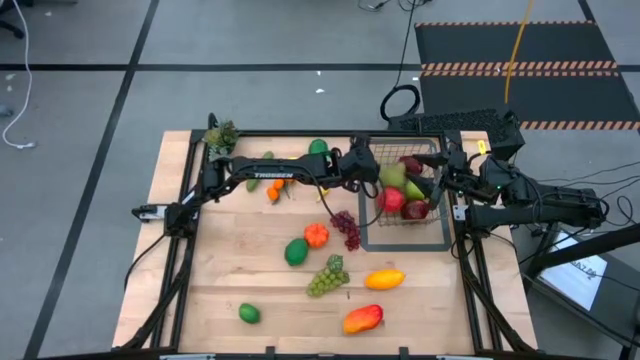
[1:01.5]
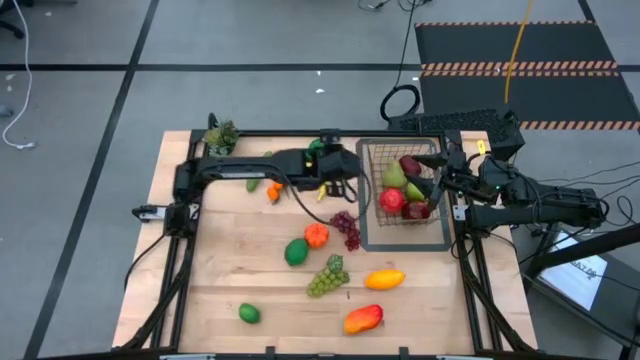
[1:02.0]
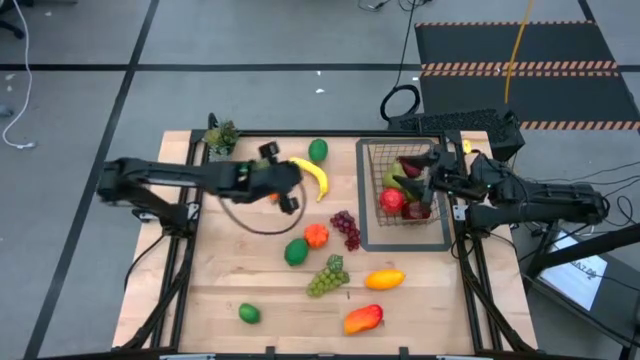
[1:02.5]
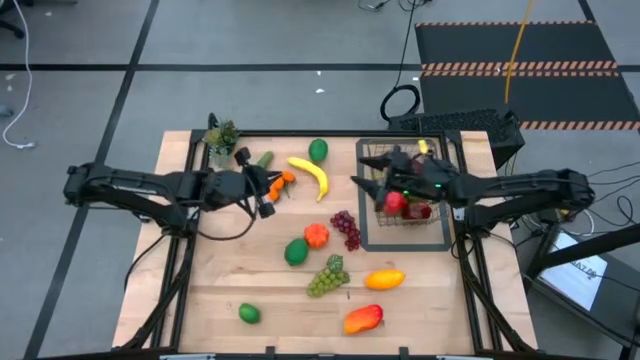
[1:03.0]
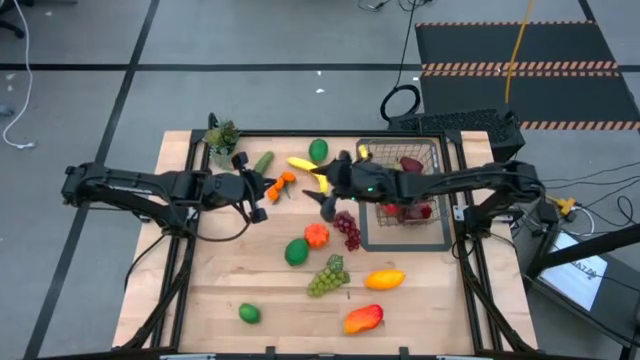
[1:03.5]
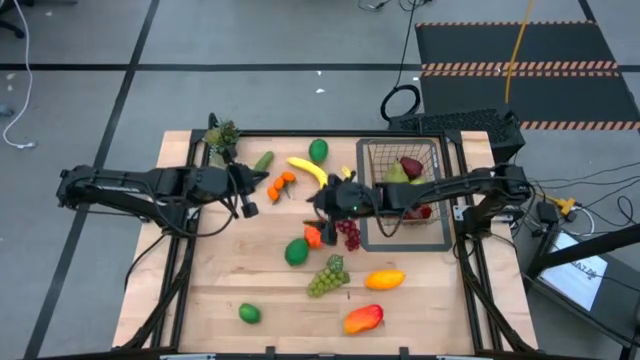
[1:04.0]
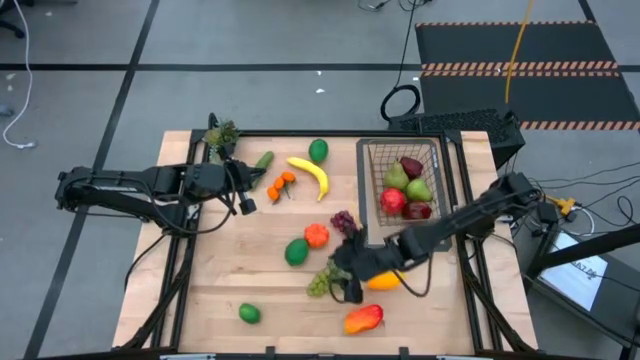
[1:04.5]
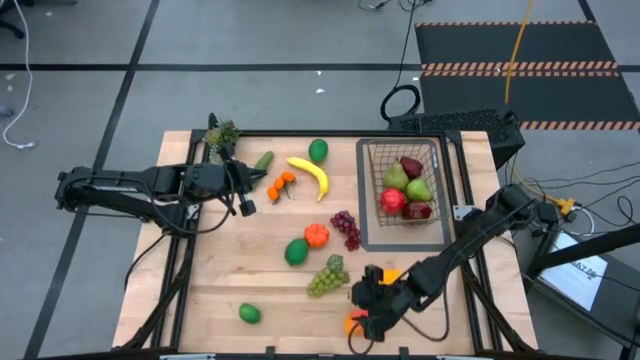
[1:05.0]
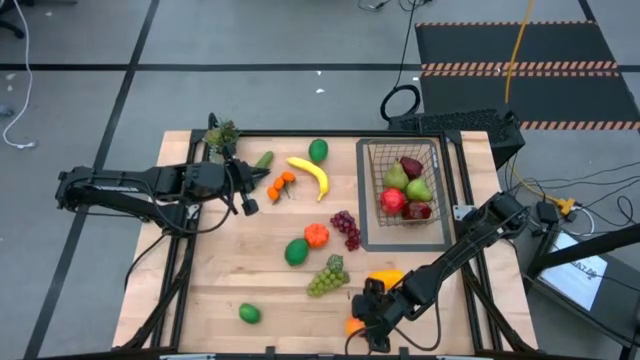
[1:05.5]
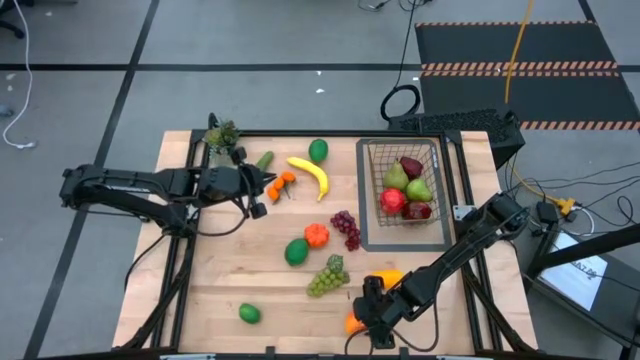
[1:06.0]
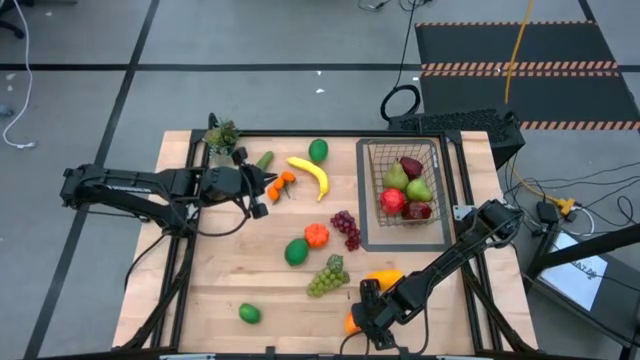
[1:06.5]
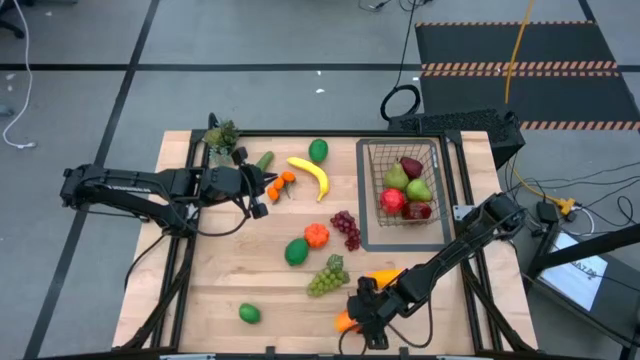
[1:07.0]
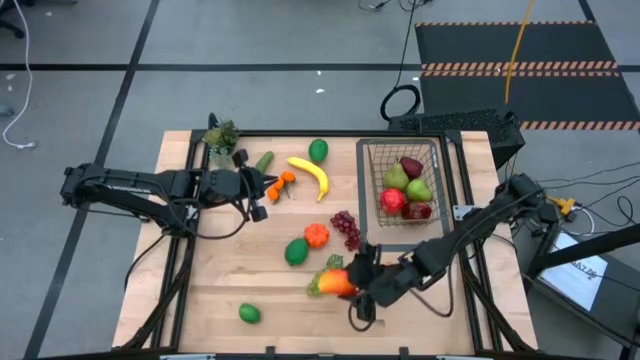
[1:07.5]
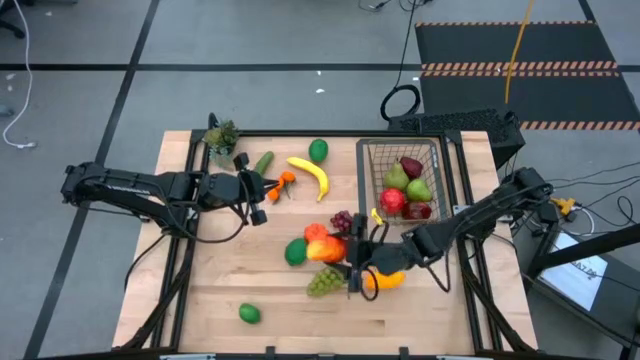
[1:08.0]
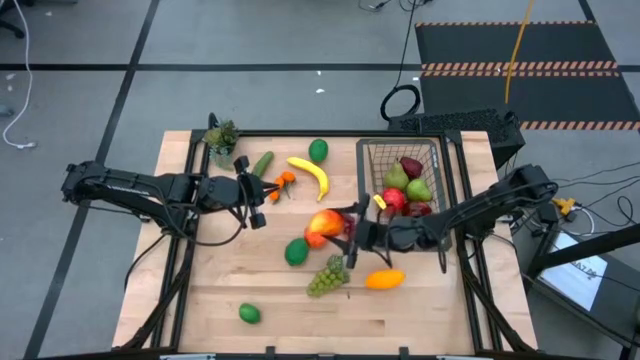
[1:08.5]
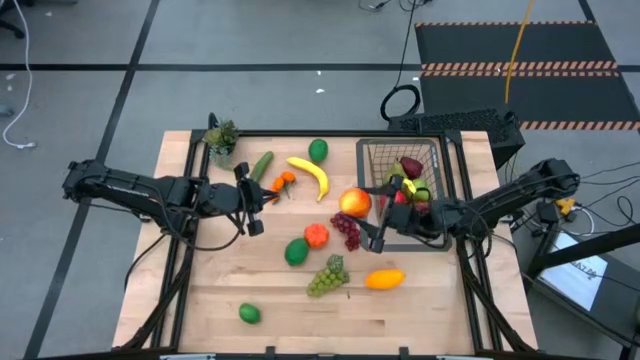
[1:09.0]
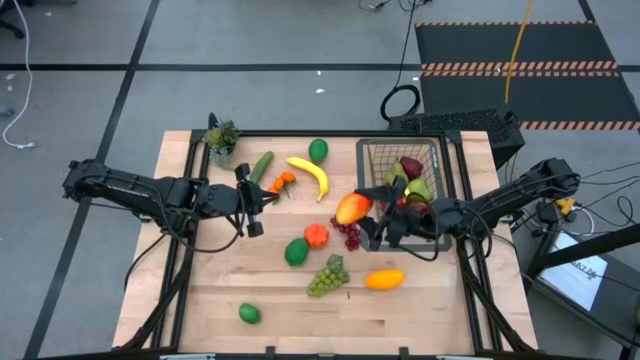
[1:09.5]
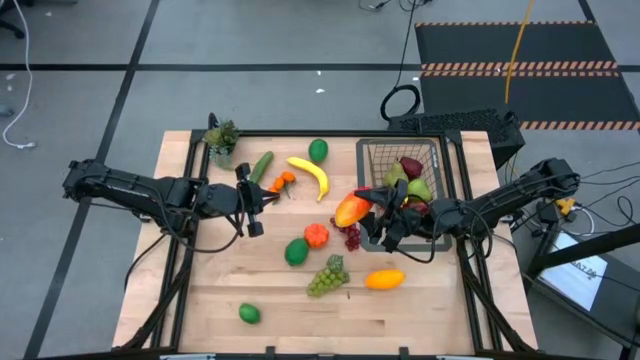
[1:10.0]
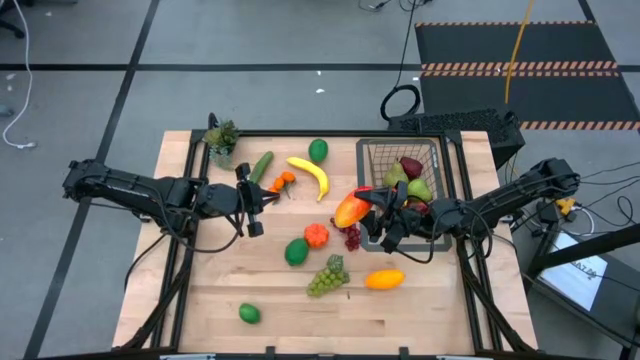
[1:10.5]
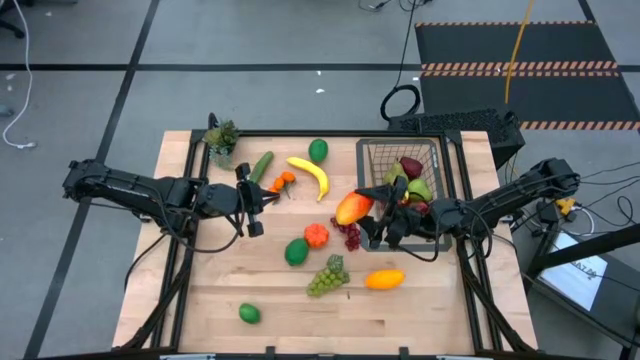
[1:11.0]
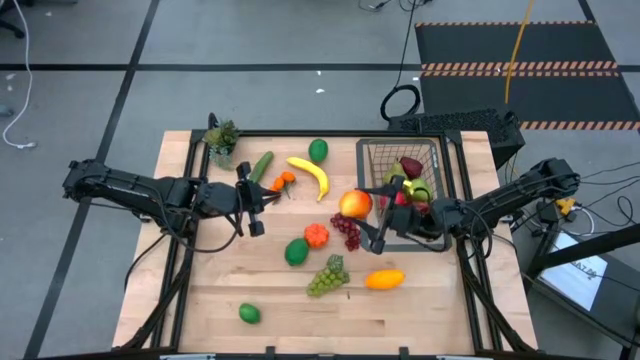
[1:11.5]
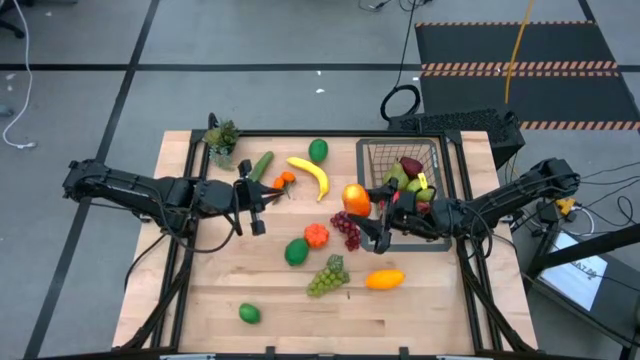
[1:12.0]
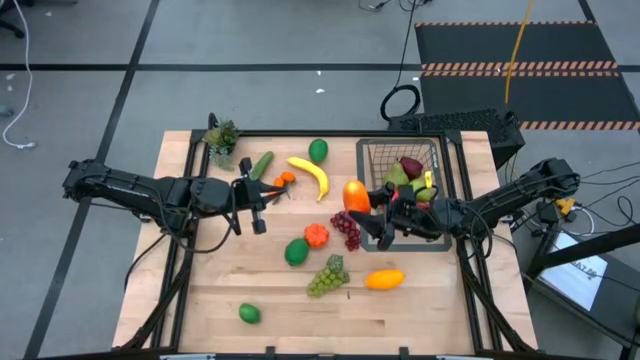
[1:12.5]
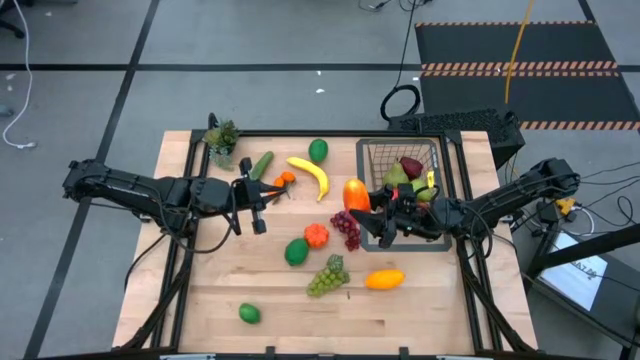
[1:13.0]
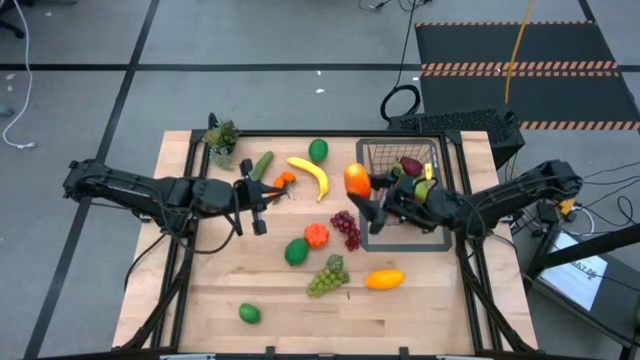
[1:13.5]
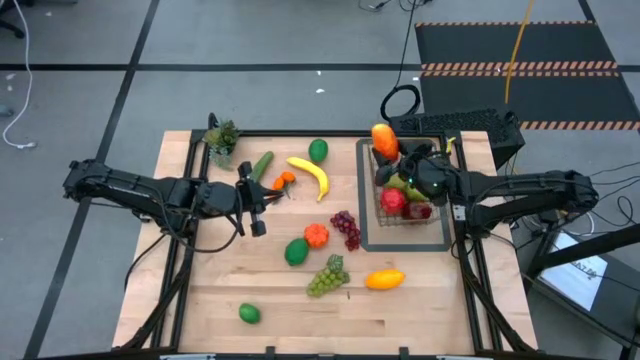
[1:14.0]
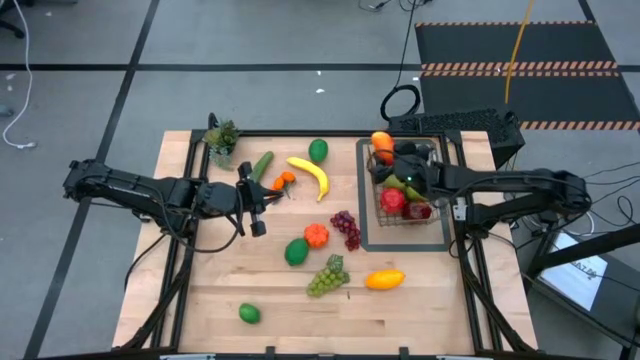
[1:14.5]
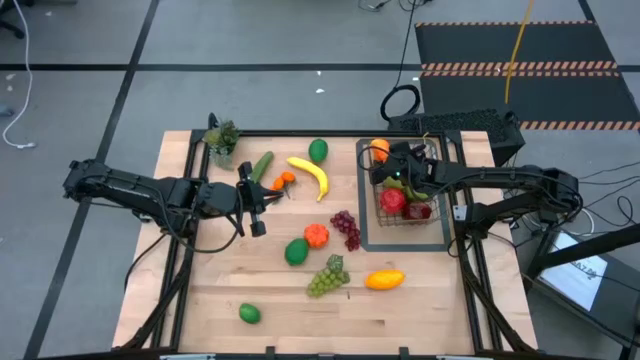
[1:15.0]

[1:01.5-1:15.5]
Task: Build produce basket
Put the bottom mango into the gold wire basket

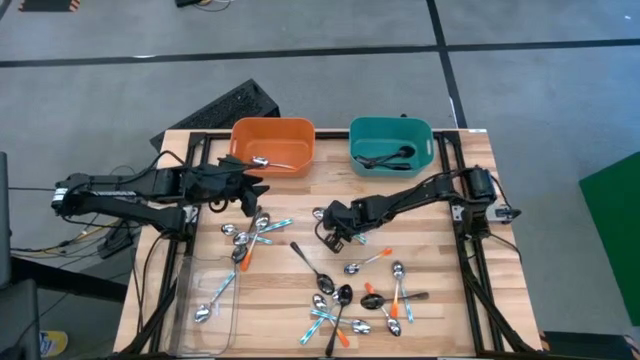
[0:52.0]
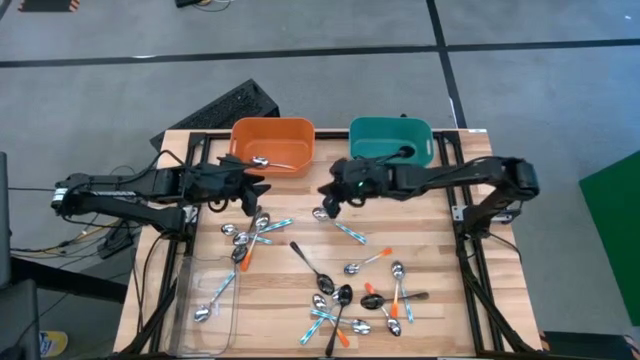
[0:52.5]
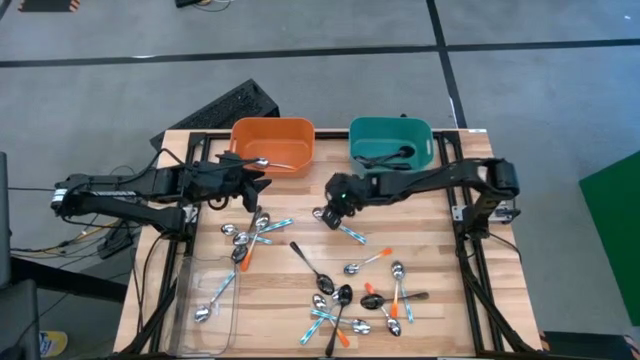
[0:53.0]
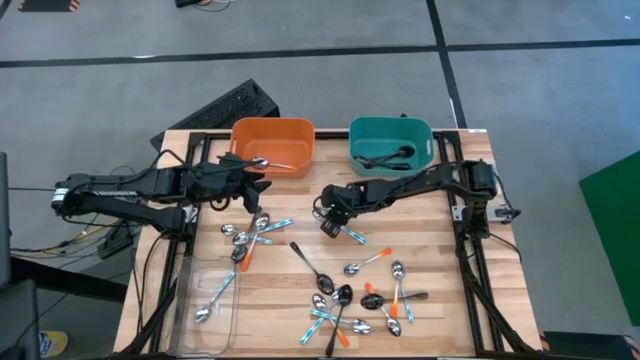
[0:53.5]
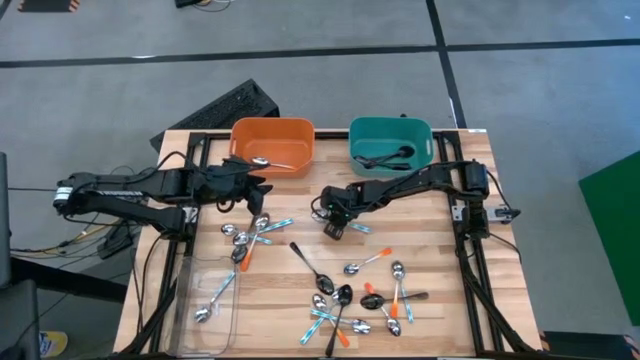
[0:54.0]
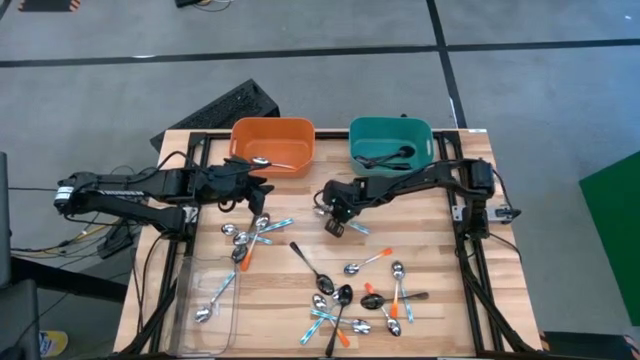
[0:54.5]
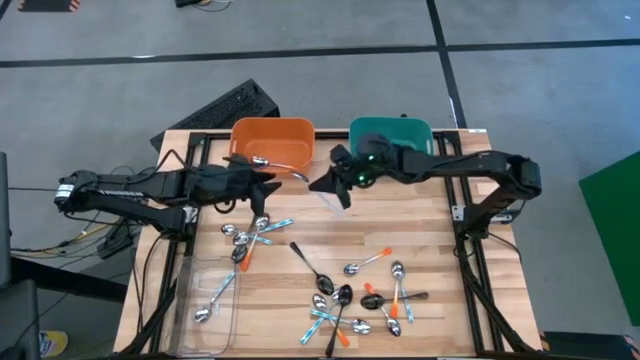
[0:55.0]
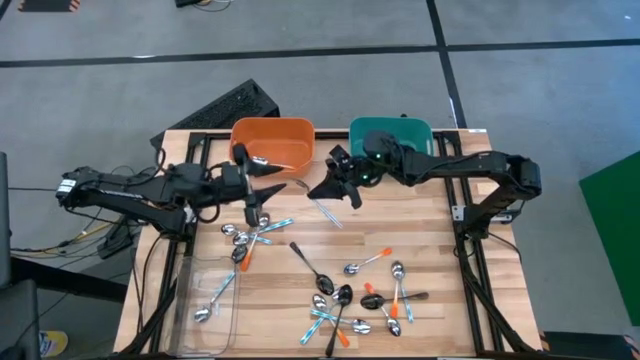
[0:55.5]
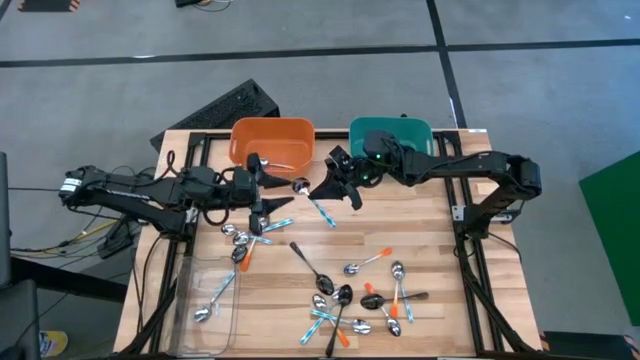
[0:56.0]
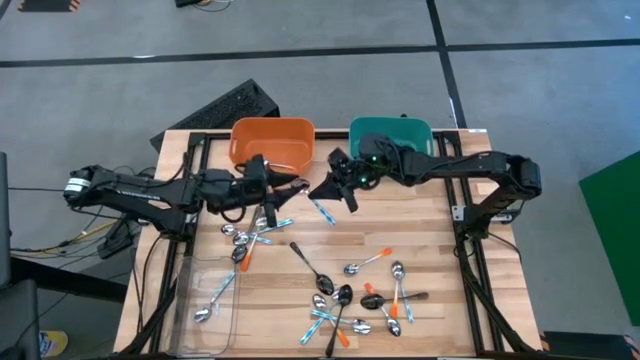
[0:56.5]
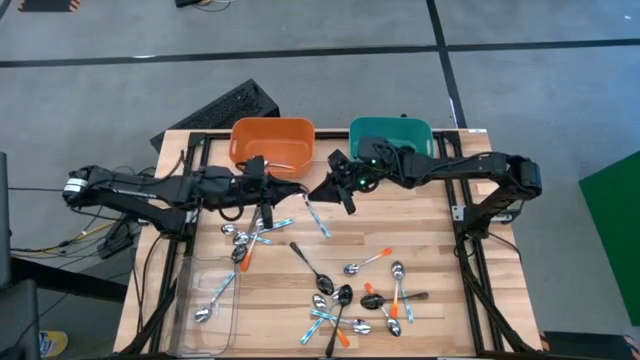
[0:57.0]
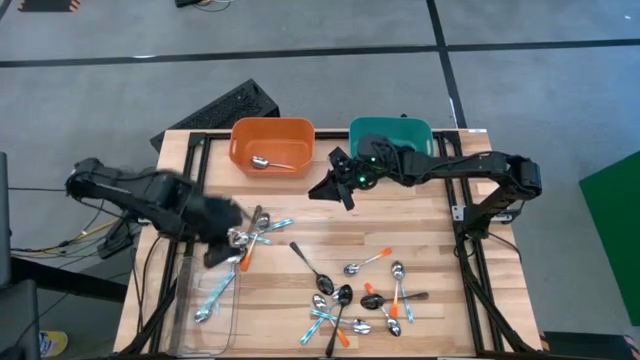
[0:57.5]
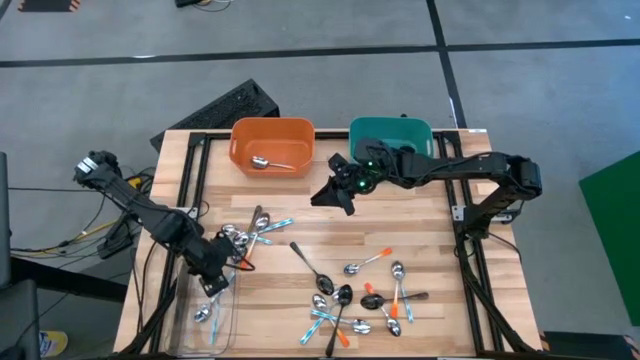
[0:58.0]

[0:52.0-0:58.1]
Task: Sort silverware by color (type)
Put the green spoon into the transparent bin
